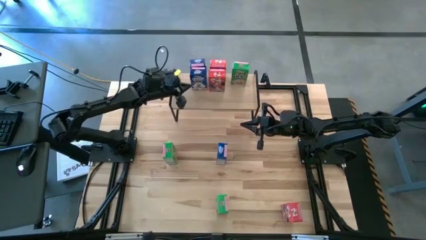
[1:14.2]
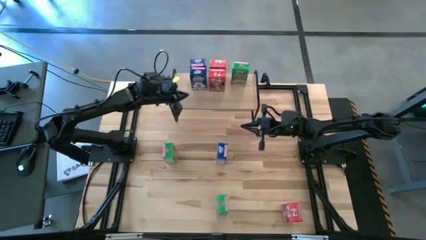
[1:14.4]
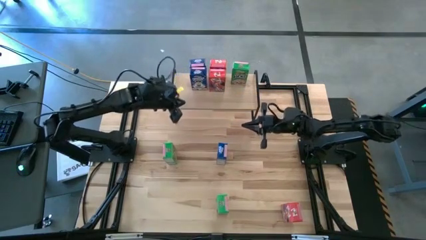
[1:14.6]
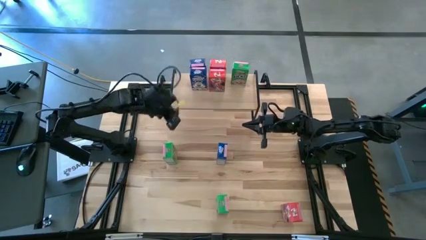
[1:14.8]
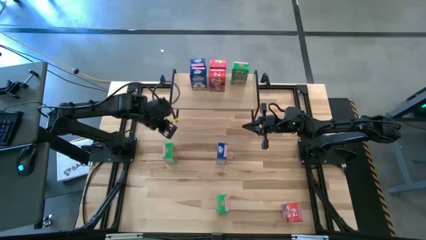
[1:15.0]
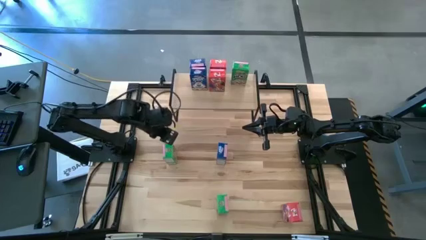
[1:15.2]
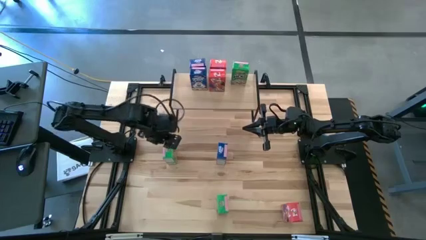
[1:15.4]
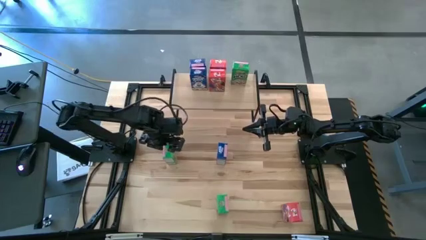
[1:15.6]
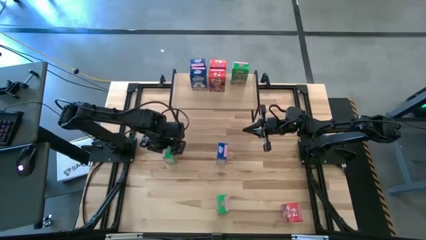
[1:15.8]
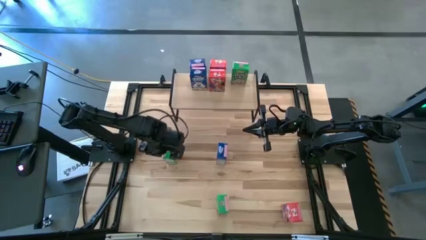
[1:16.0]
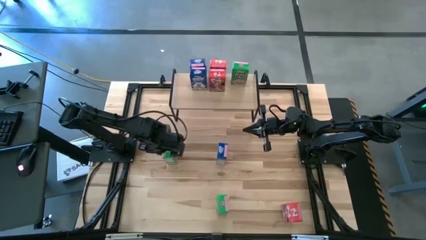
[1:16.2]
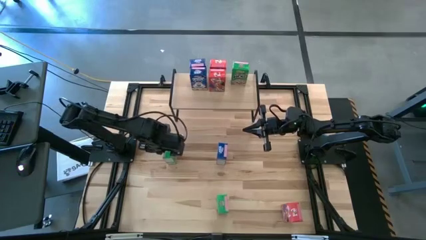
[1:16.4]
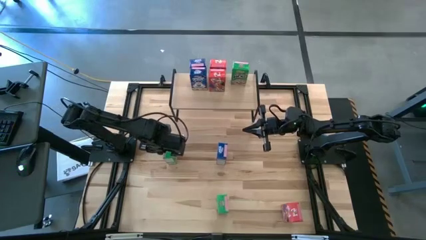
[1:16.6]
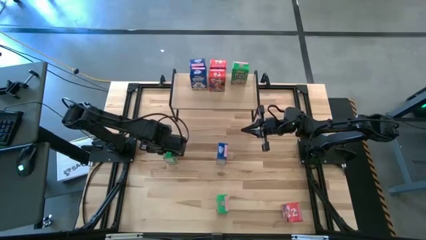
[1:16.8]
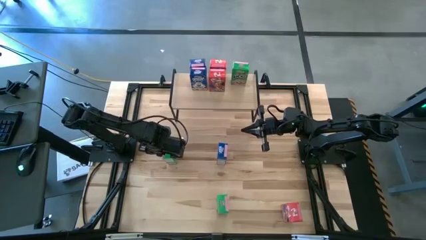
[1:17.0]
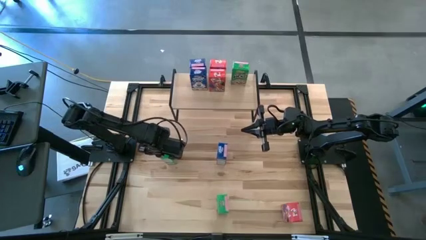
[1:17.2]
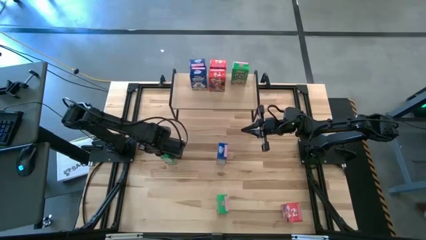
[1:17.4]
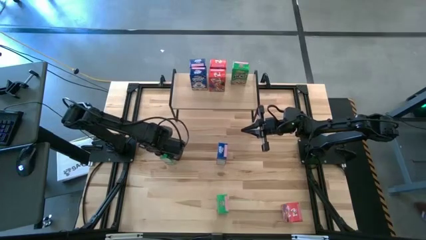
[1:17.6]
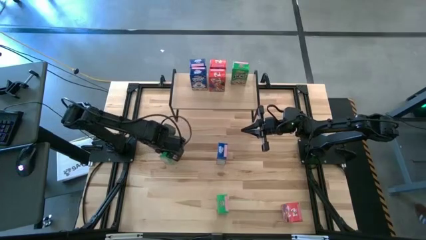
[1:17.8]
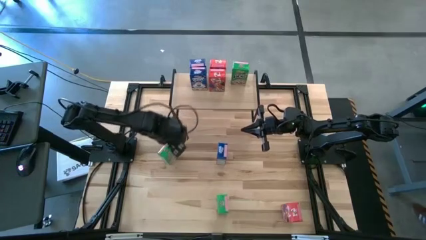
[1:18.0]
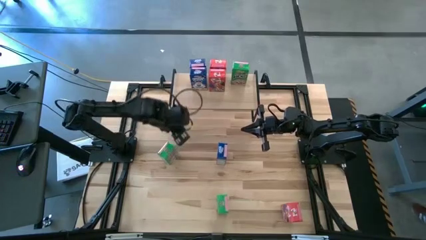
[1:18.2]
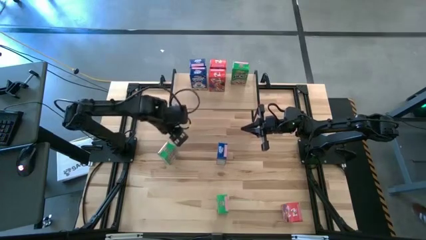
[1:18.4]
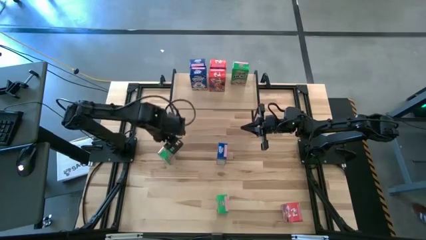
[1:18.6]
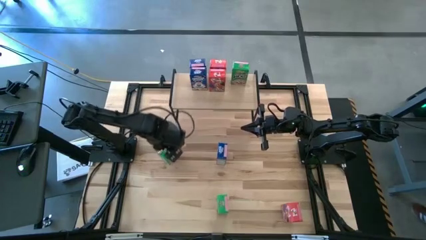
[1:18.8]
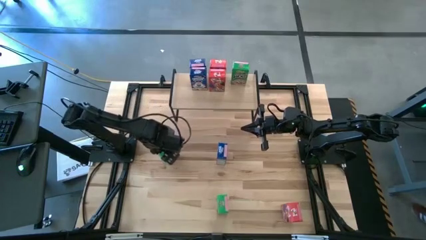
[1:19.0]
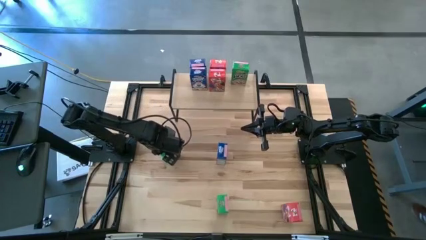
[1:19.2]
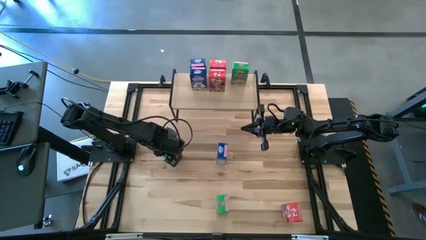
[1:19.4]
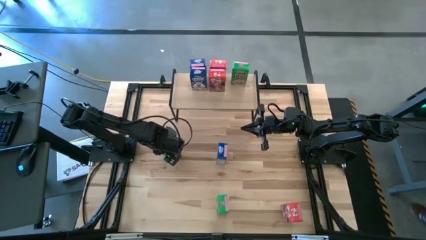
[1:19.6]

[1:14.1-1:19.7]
Task: Stack cereal on shelf
Put the top green cereal box aligned with the other green cereal box on the shelf

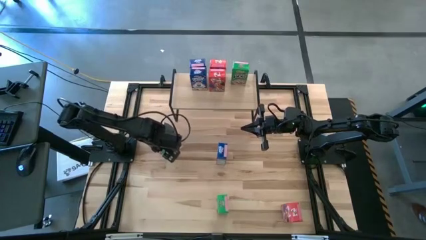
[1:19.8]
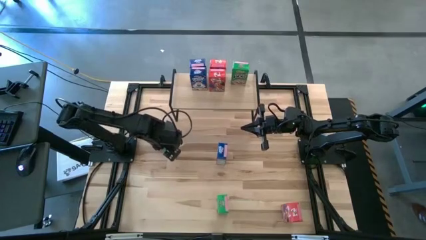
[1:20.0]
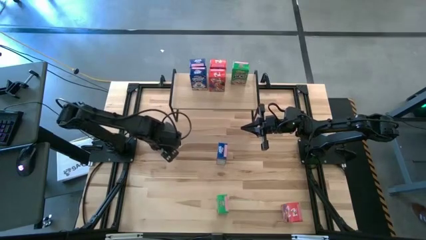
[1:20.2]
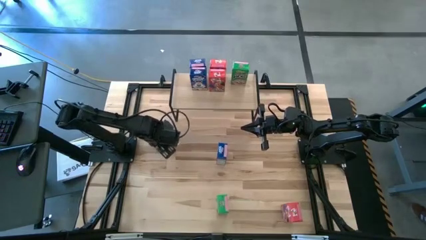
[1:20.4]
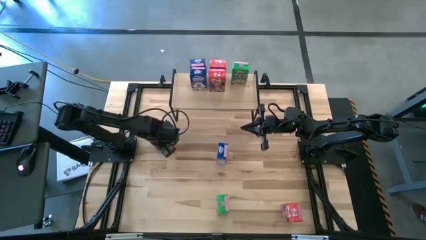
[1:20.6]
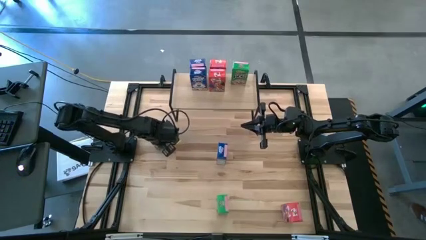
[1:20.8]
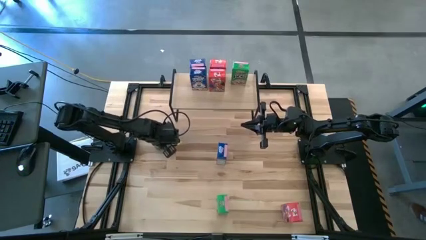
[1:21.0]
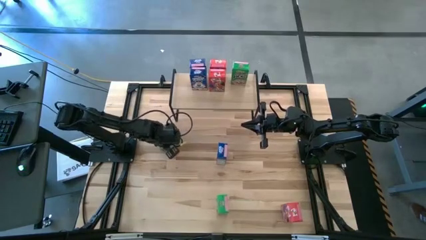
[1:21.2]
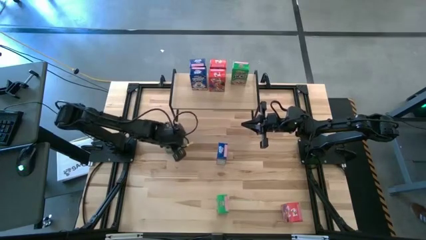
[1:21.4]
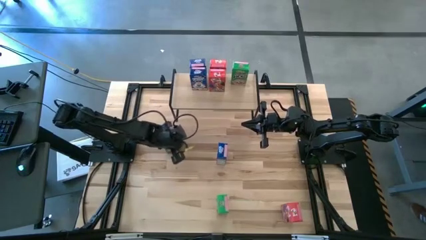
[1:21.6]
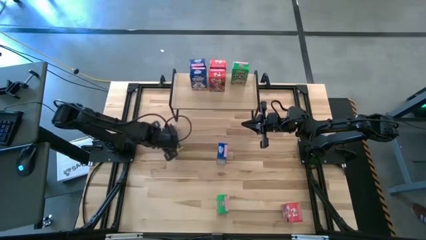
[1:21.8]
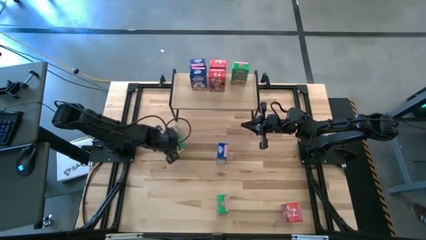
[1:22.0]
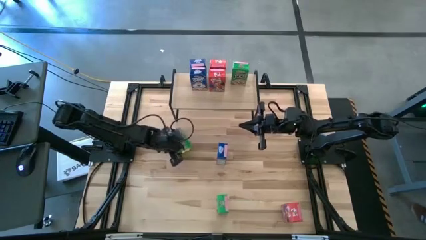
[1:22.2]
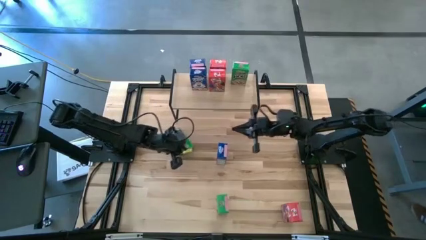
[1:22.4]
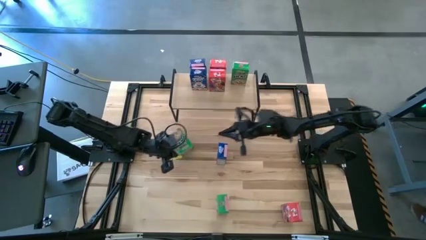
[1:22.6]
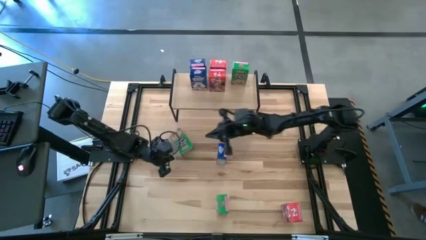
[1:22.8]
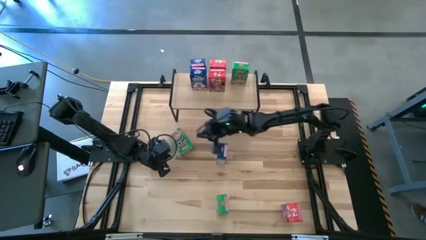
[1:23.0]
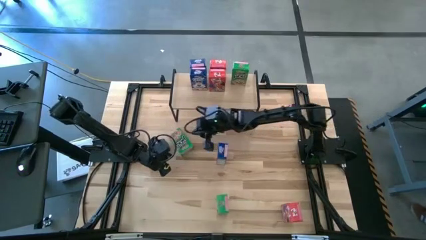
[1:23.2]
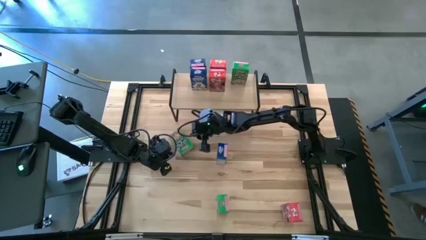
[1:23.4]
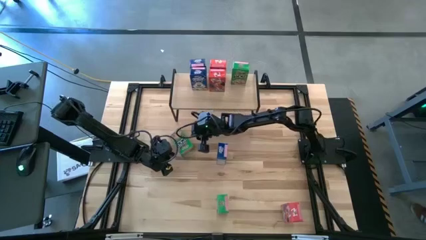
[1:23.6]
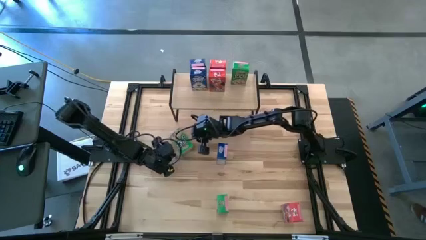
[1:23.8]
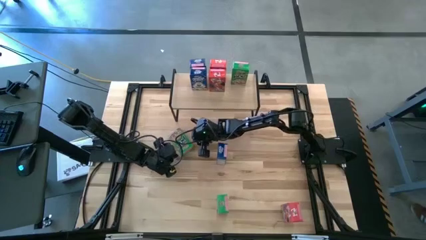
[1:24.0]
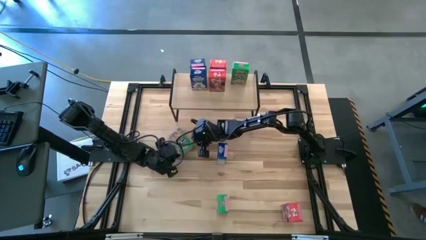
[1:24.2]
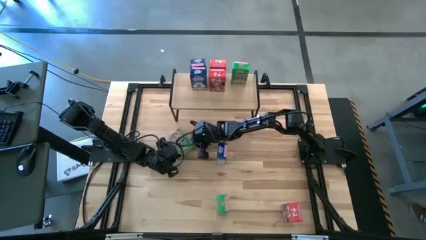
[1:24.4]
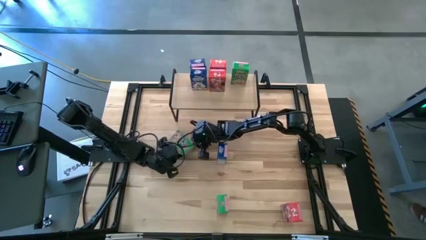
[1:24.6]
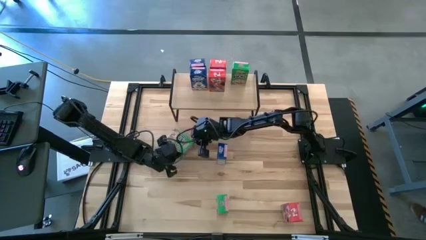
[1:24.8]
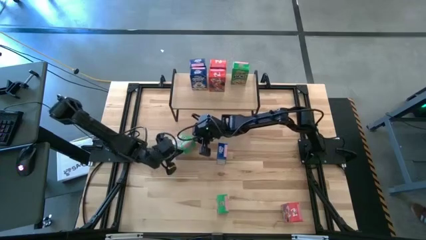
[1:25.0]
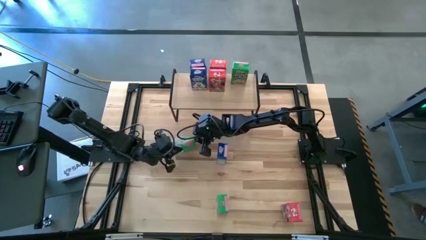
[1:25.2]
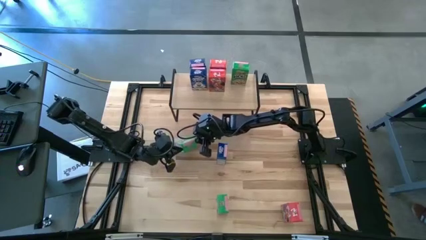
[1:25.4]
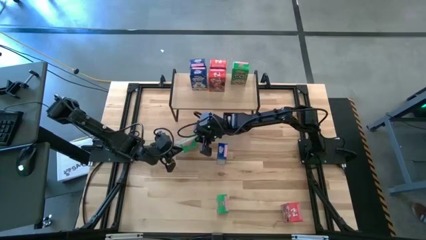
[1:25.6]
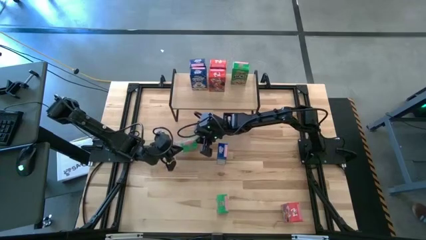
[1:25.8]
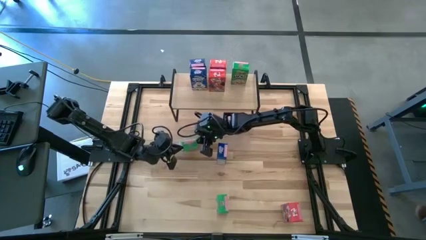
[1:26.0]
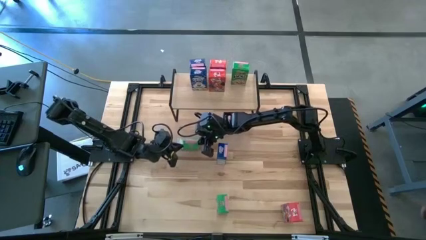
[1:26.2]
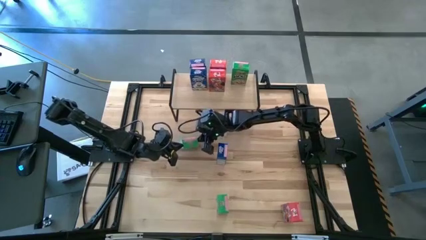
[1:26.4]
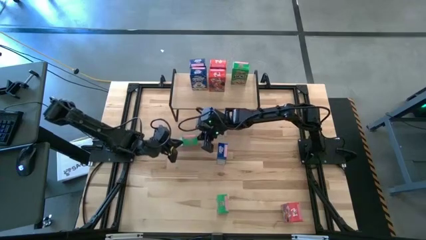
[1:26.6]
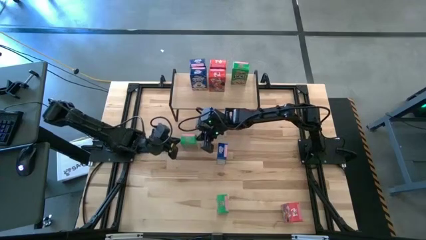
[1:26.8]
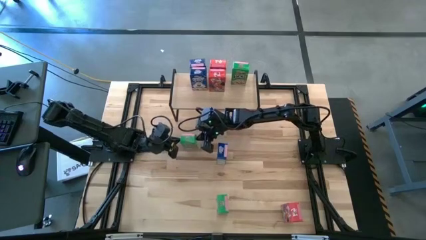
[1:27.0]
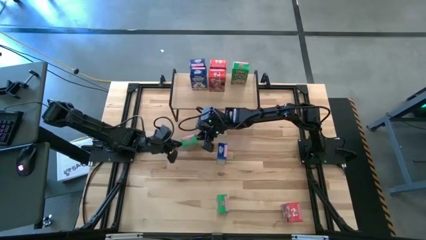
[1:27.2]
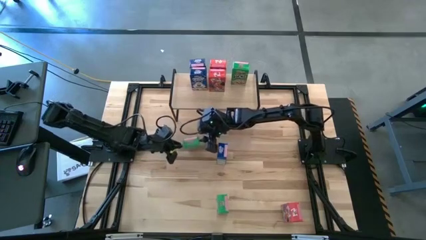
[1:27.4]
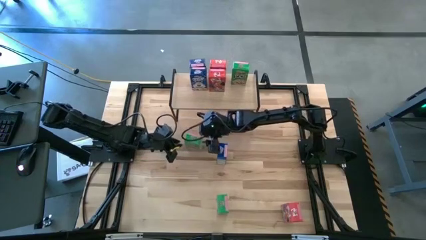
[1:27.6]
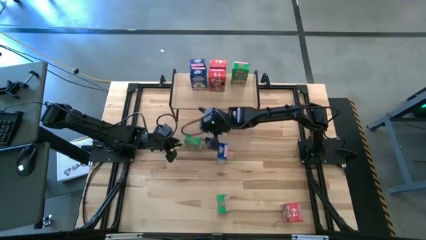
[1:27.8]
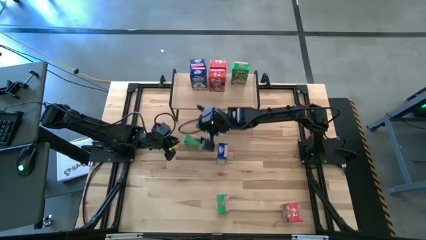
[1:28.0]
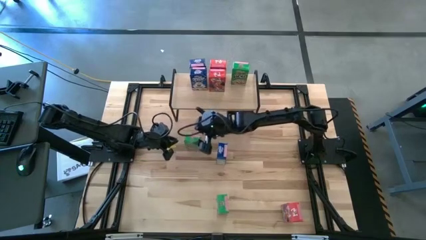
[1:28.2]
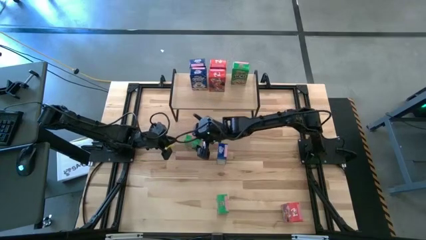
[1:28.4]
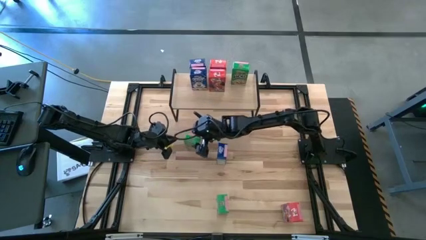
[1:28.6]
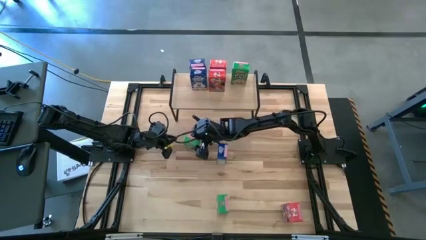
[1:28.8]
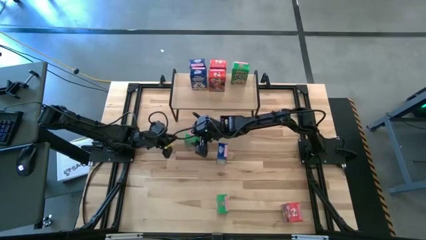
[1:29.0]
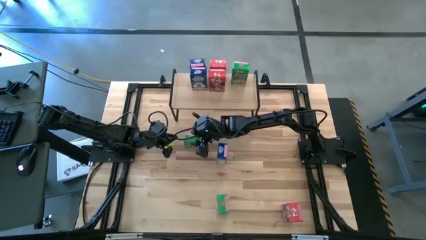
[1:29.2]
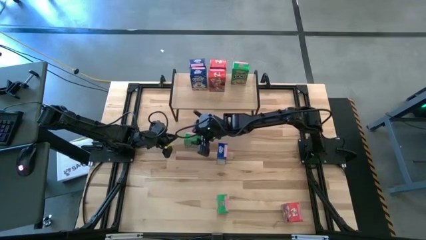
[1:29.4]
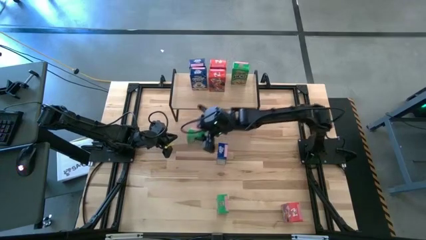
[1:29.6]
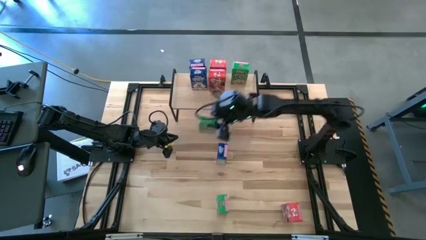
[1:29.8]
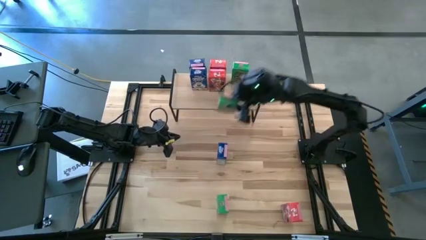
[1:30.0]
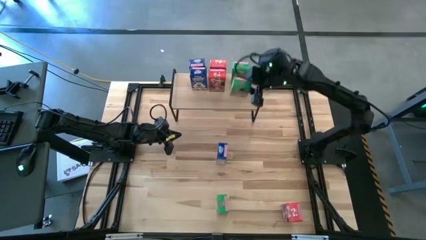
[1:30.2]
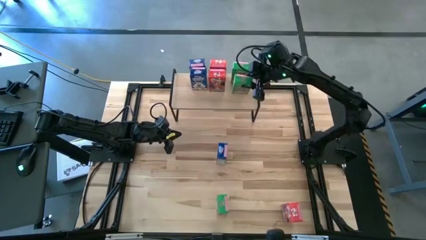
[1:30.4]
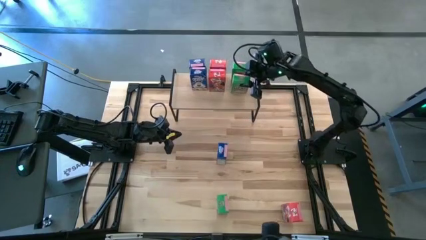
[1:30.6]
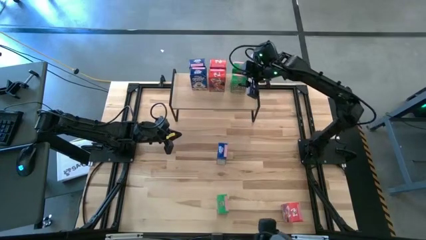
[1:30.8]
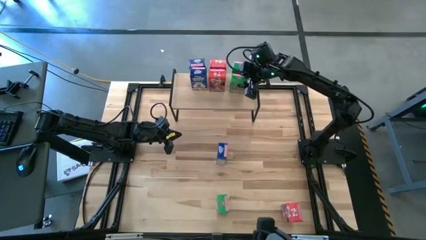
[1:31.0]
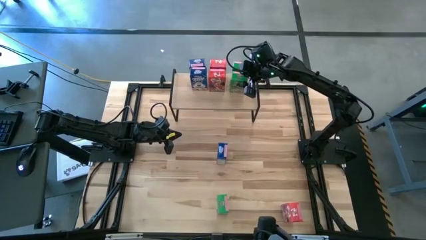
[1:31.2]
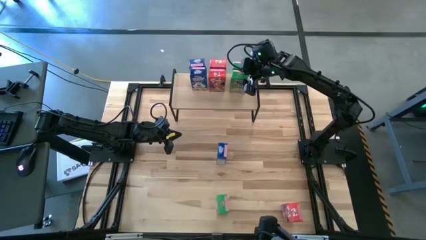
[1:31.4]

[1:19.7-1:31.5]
Put the top green cereal box aligned with the other green cereal box on the shelf
